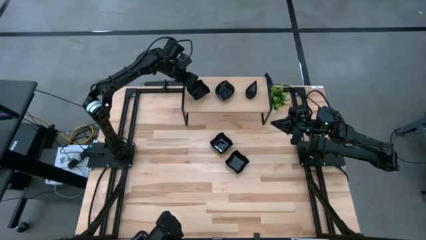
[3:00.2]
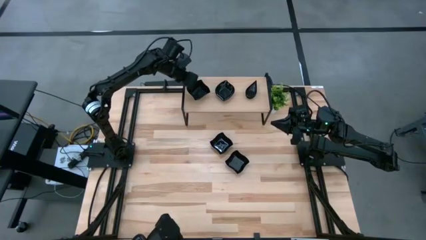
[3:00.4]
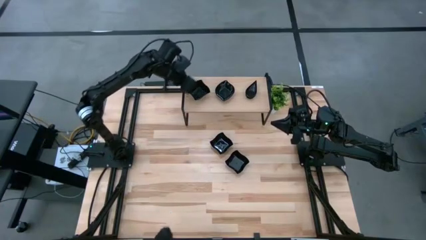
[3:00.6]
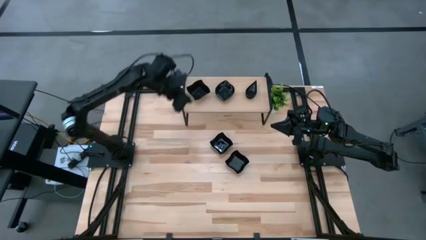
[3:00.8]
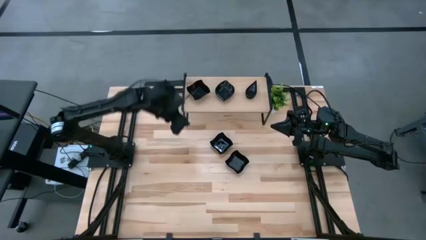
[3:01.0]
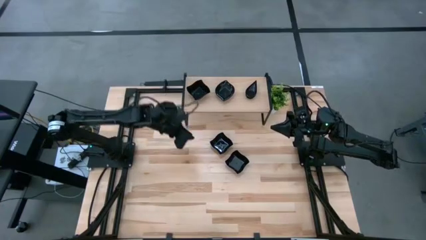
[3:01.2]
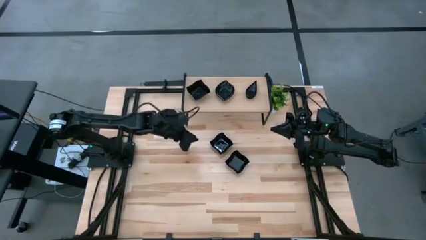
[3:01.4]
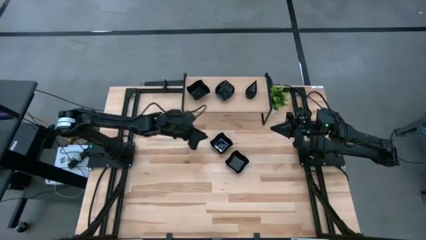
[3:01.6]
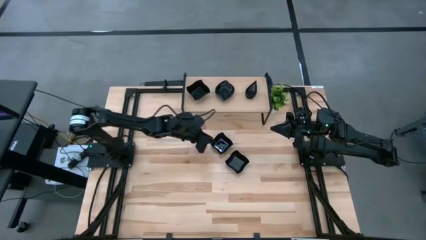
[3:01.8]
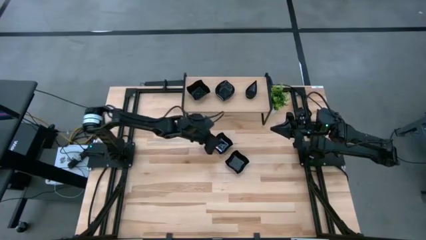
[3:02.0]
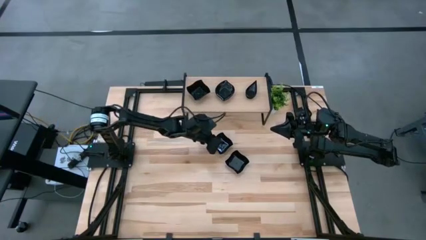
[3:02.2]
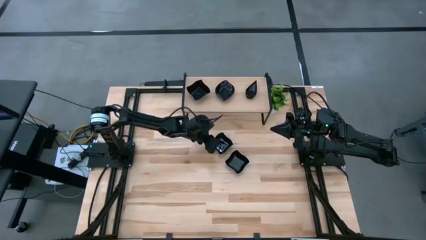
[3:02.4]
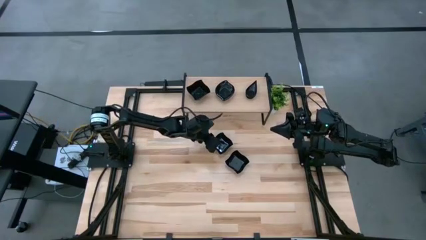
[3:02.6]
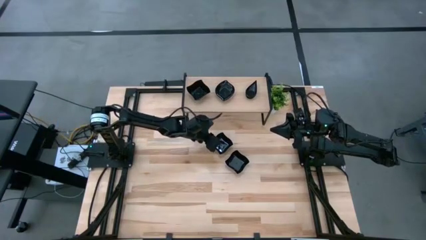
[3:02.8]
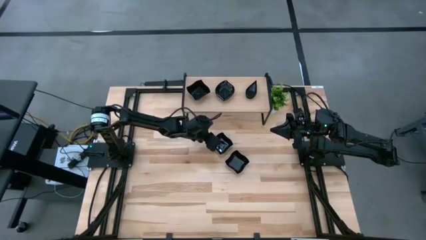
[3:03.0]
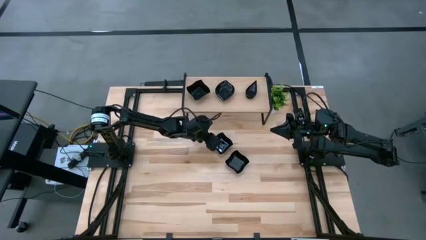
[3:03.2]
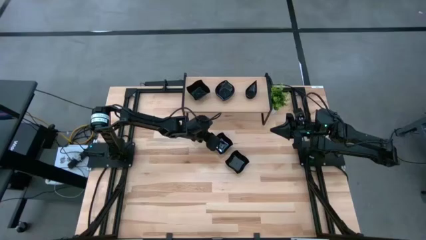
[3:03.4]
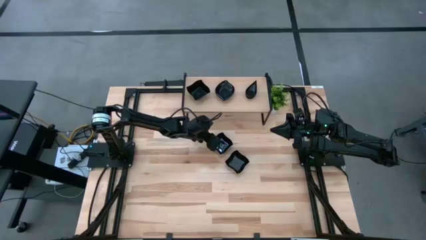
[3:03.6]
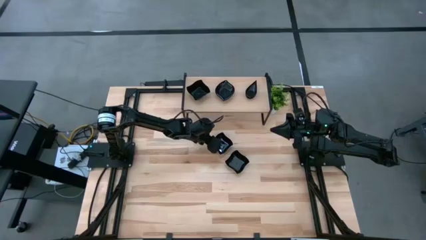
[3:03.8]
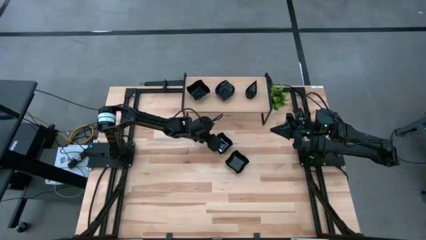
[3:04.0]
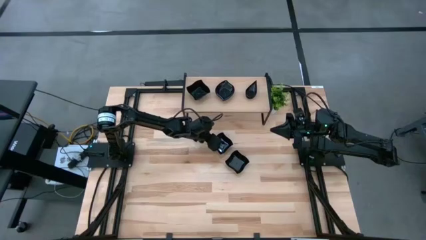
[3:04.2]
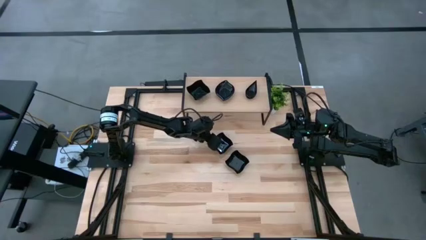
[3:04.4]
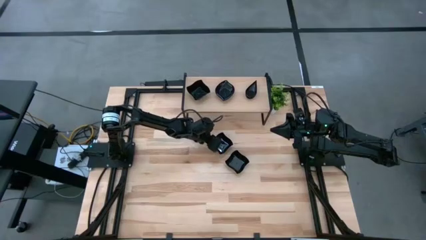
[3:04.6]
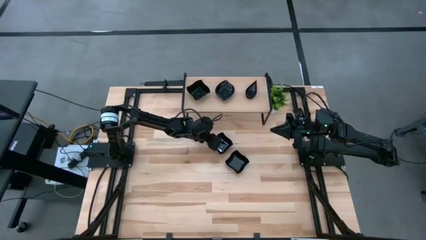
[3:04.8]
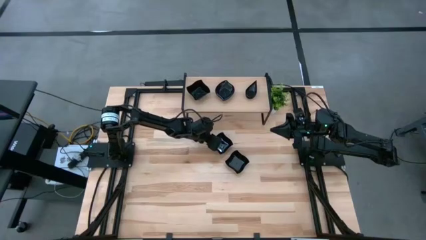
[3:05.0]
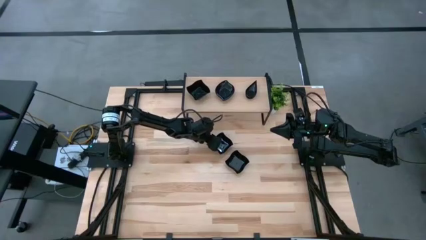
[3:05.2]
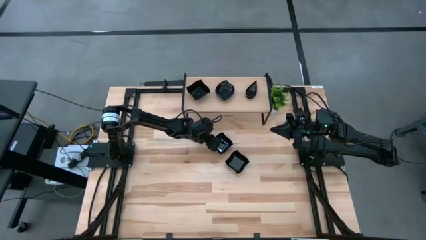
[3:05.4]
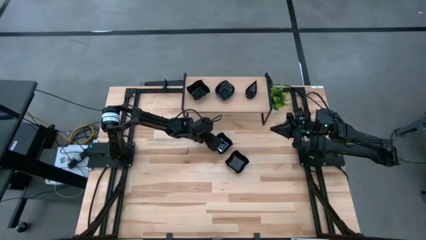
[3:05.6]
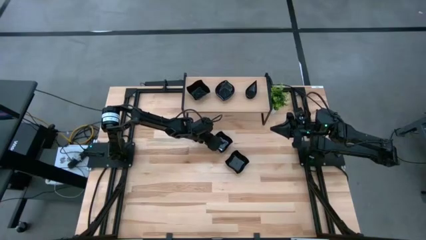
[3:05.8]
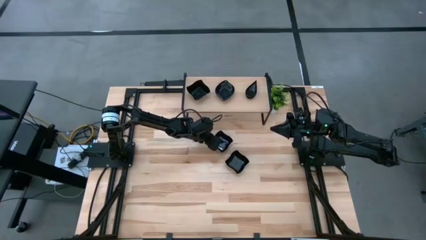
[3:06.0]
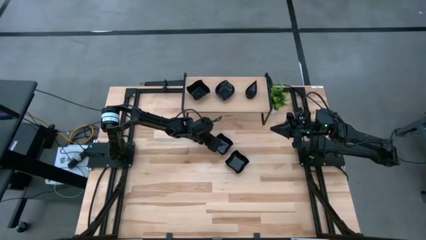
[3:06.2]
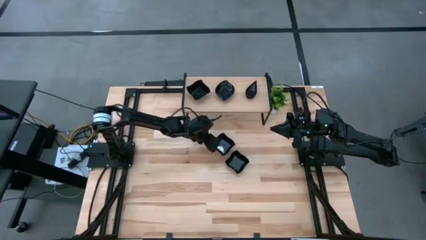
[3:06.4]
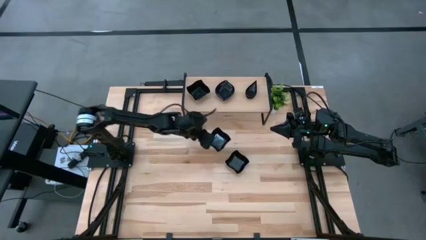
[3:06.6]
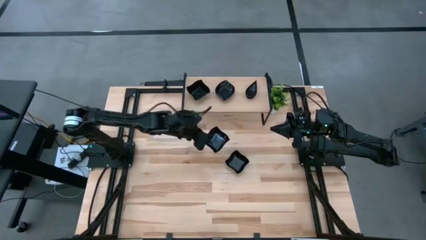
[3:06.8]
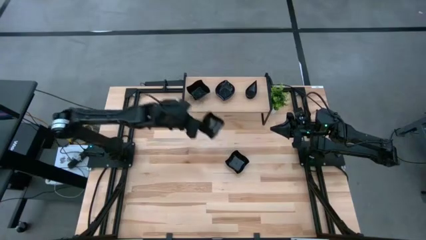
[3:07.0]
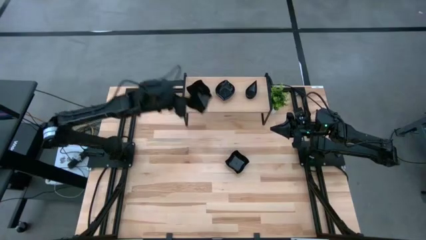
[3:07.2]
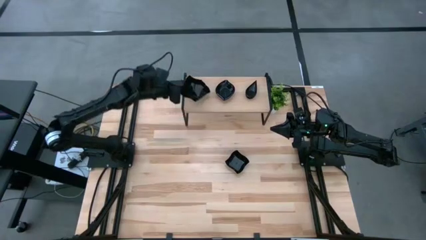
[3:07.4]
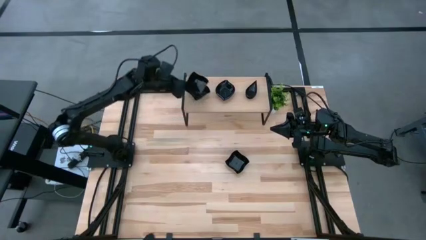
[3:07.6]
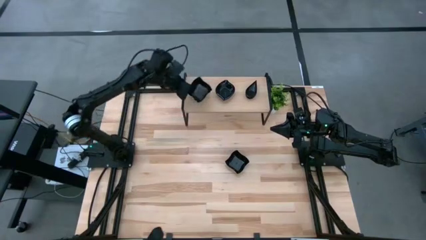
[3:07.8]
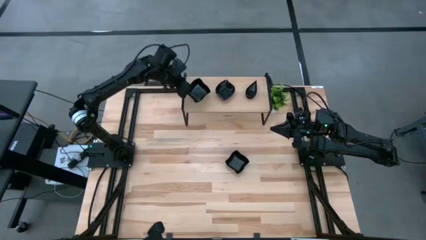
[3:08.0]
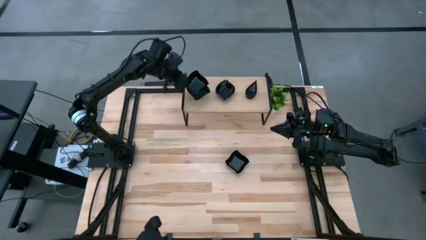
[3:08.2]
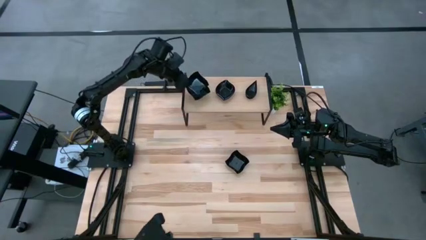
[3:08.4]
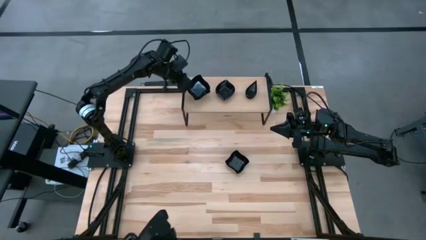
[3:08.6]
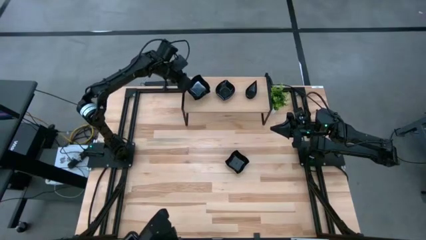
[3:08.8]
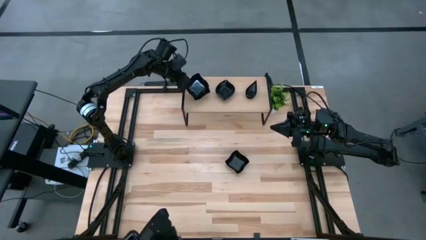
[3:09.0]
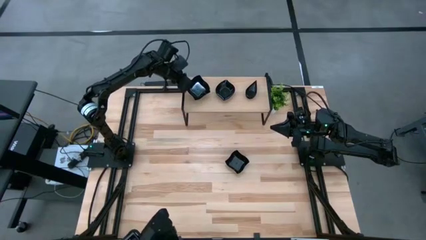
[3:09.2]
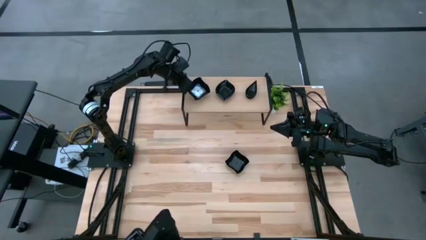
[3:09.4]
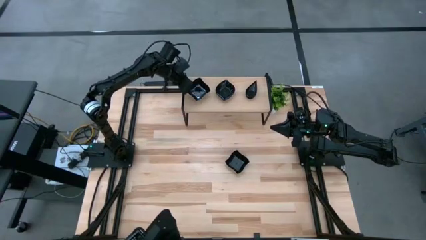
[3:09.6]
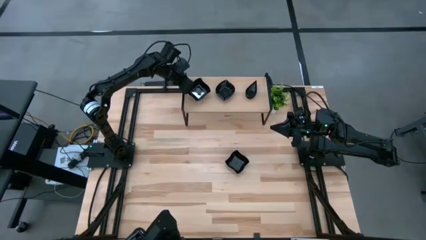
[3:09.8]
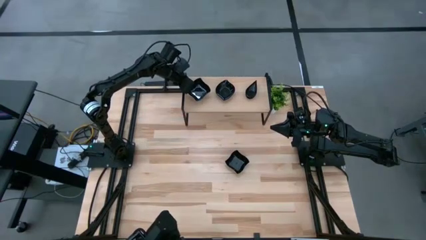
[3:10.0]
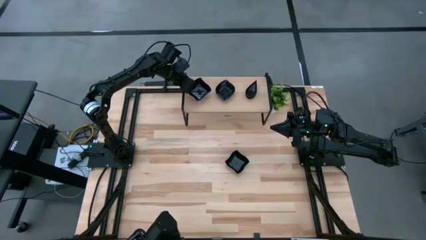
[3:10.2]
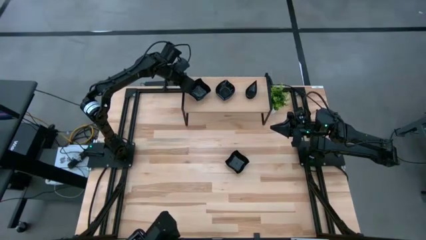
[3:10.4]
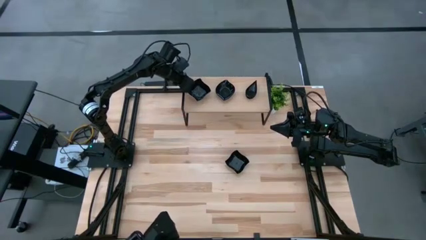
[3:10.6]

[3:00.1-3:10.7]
Task: Pick & Place Mini shaped plates
Stack the top black distorted square plate on top of the other black distorted square plates on the shelf

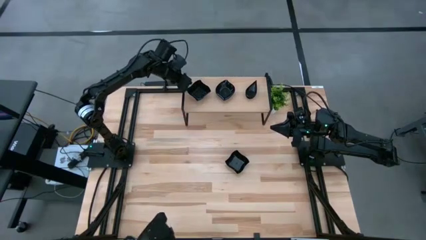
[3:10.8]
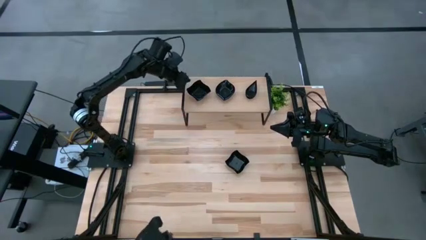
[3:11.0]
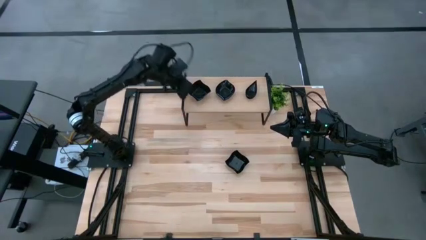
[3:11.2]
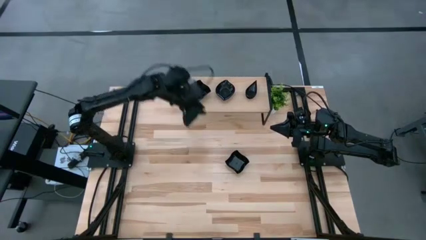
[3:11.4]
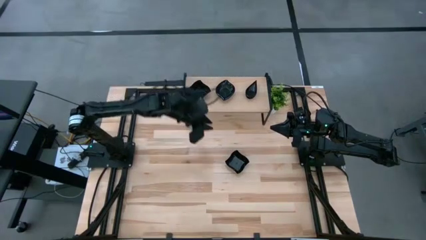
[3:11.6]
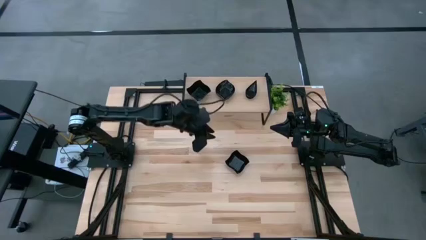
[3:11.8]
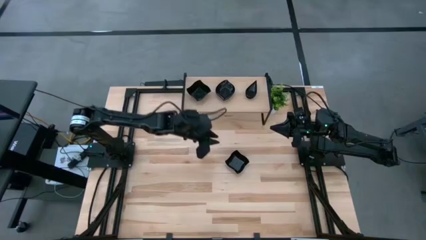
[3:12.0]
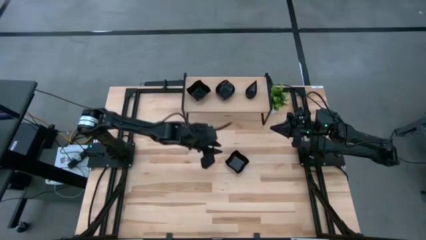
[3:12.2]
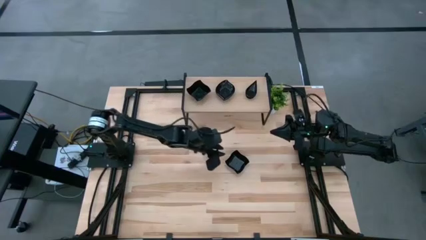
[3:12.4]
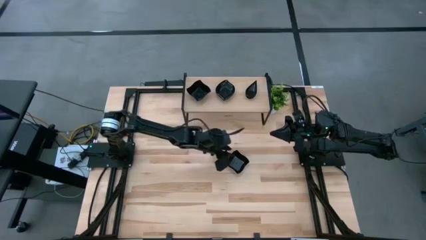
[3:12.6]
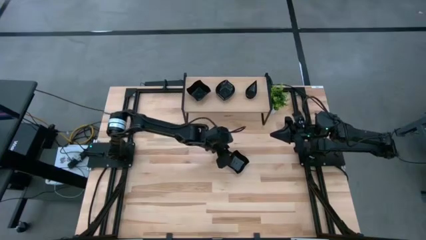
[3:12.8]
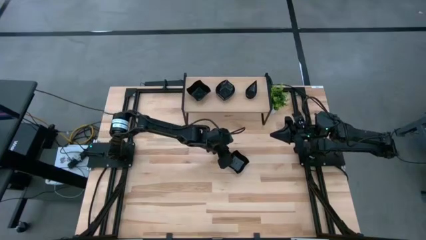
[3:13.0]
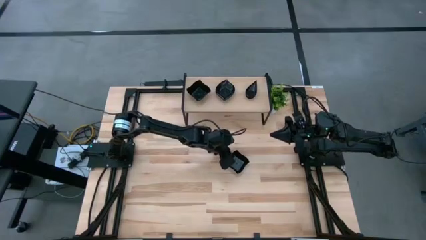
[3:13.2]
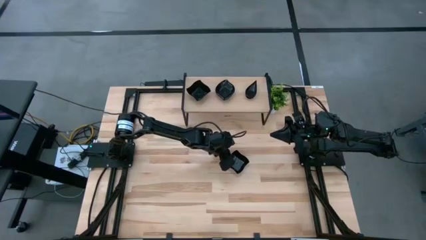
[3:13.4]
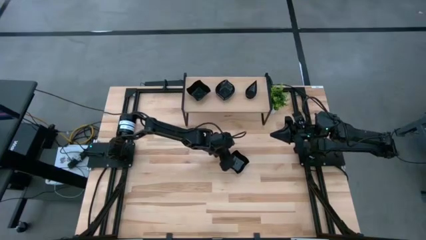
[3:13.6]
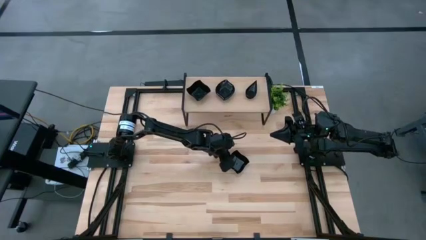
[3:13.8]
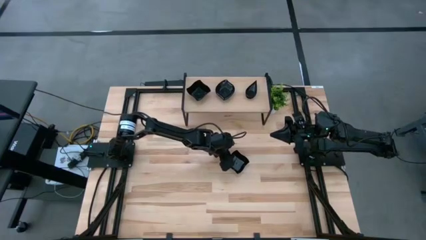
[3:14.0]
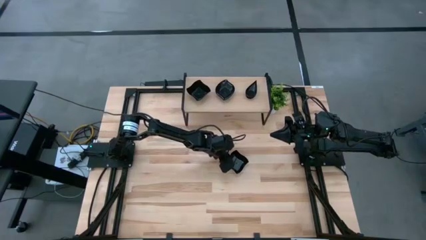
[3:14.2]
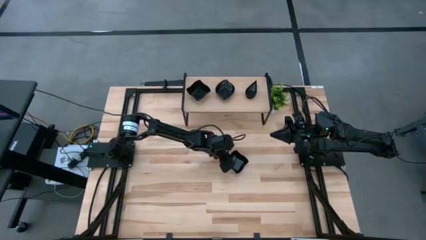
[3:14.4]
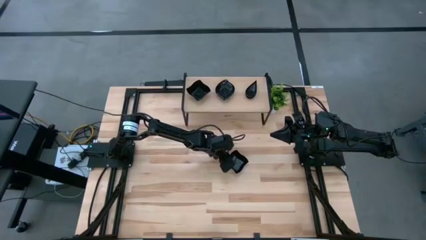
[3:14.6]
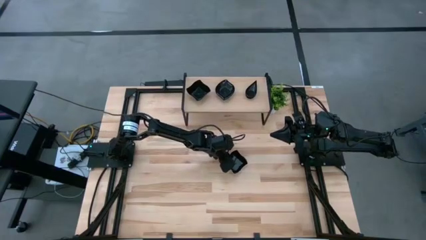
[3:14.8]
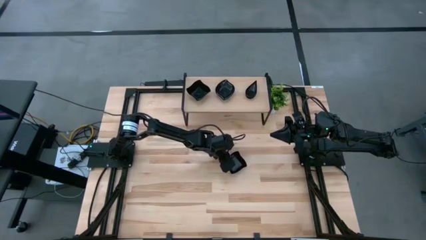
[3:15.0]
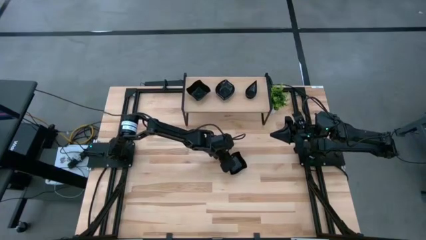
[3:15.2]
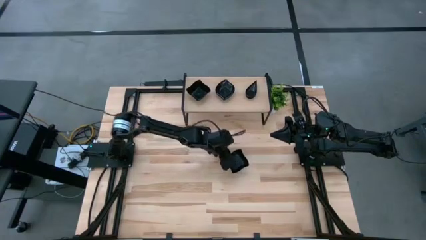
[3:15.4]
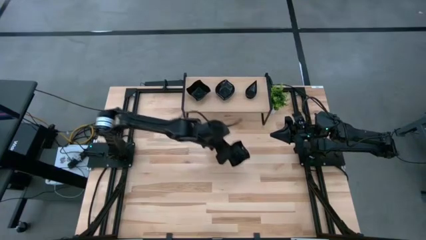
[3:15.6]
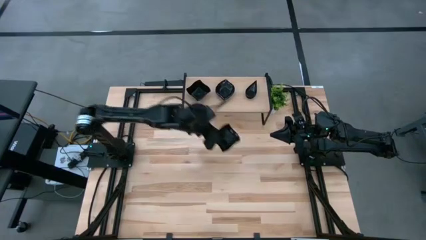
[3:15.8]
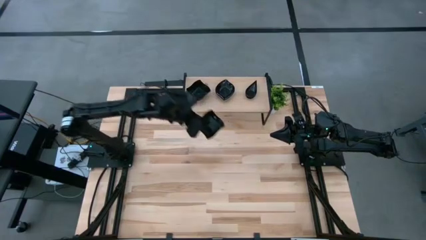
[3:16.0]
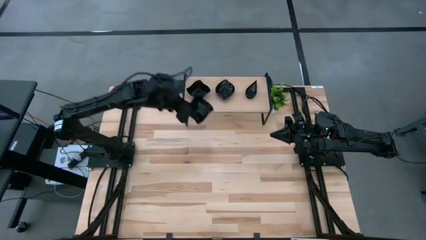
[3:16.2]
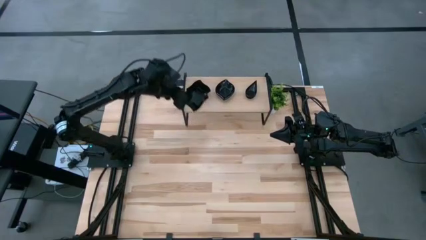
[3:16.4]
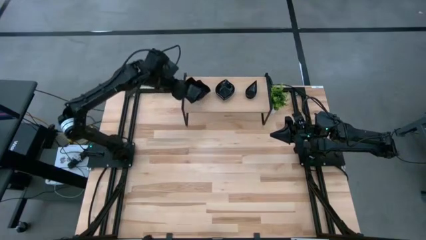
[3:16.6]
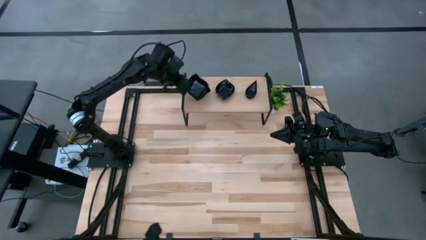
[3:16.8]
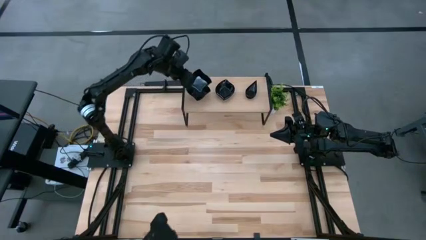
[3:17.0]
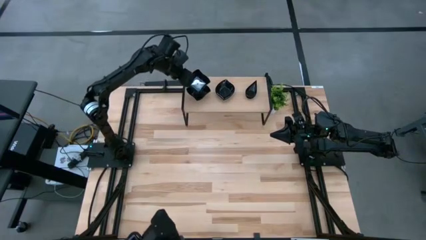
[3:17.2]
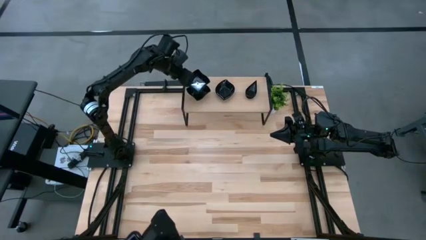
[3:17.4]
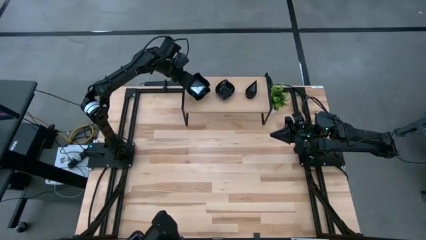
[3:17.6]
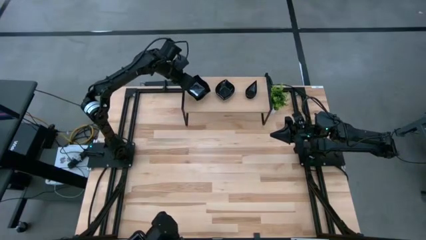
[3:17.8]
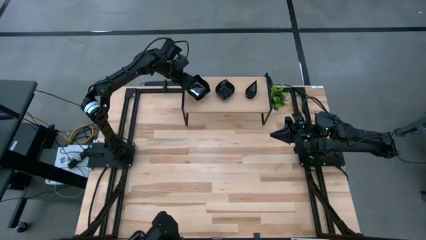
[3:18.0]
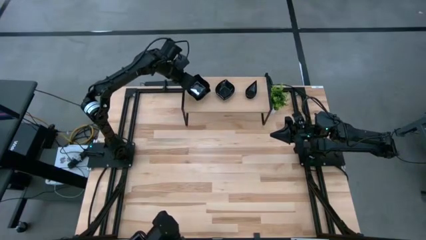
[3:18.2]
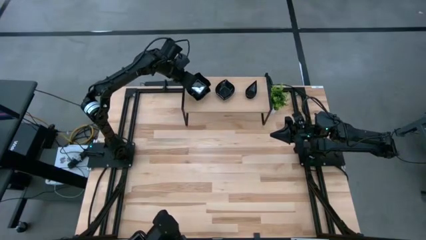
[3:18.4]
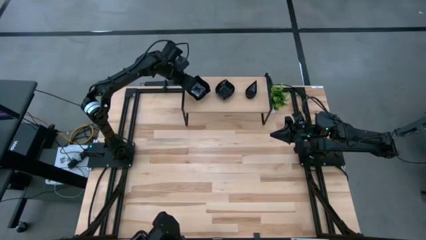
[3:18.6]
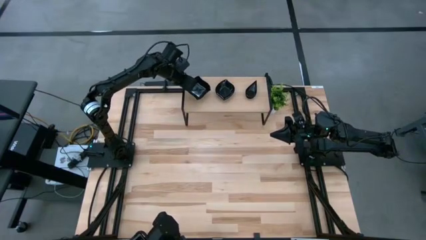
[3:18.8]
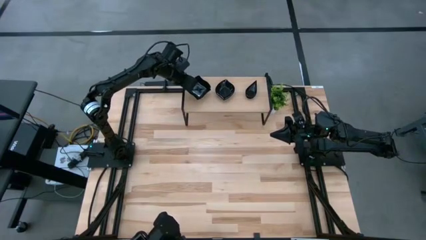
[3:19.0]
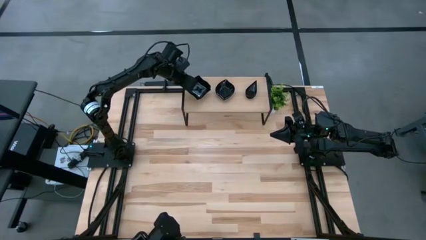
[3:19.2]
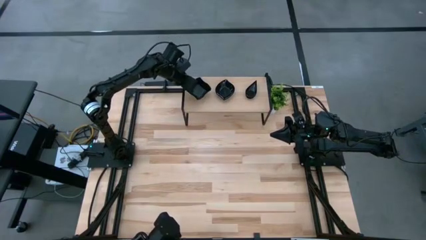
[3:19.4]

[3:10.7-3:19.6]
Stack the black distorted square plate on top of the other black distorted square plates on the shelf
